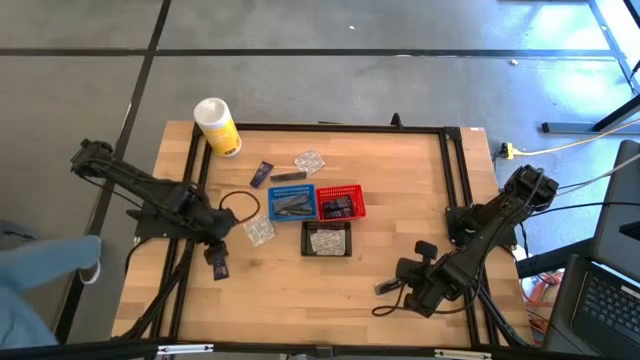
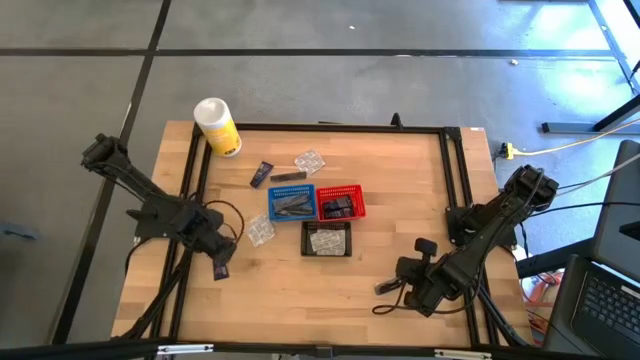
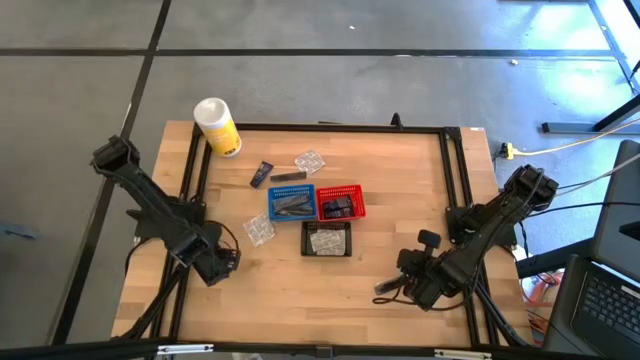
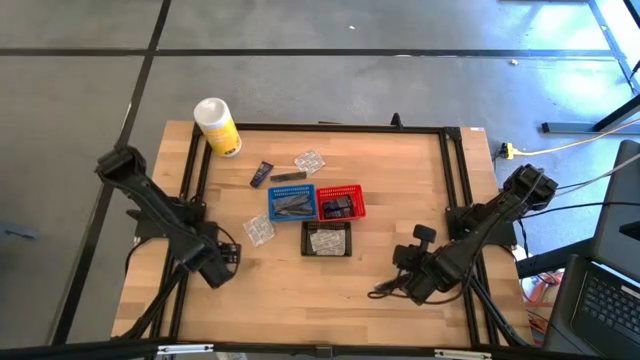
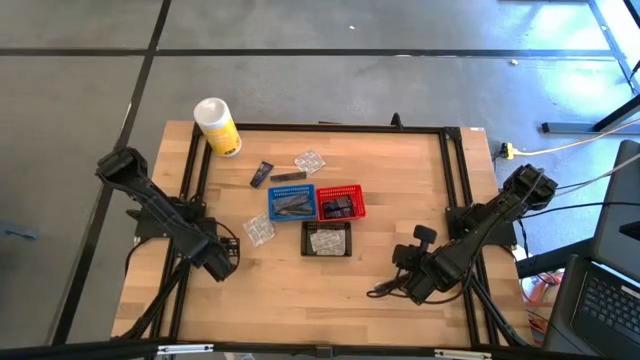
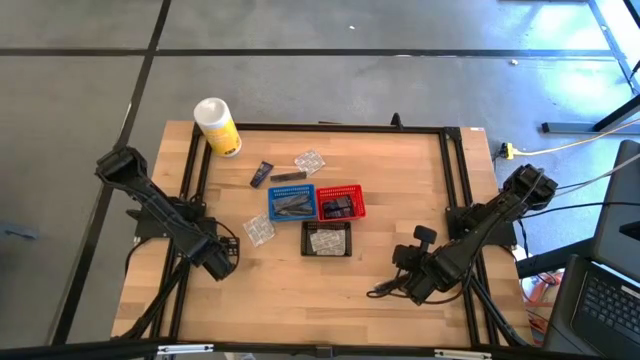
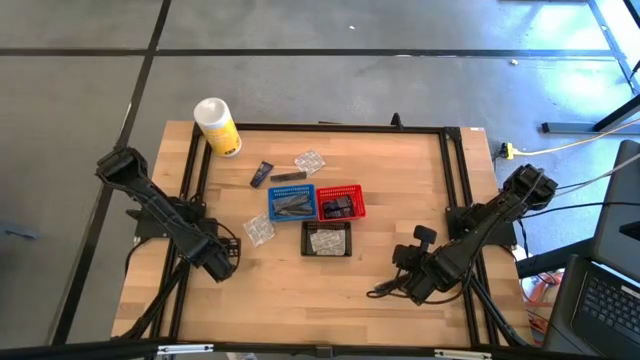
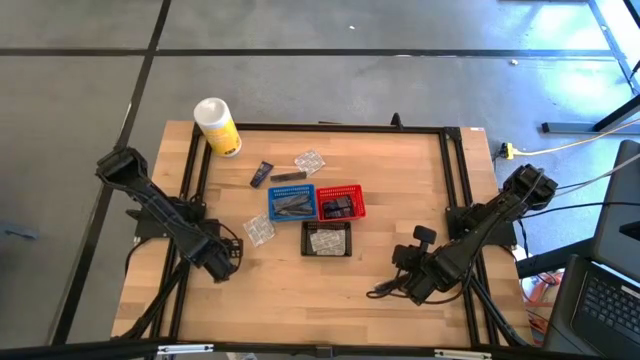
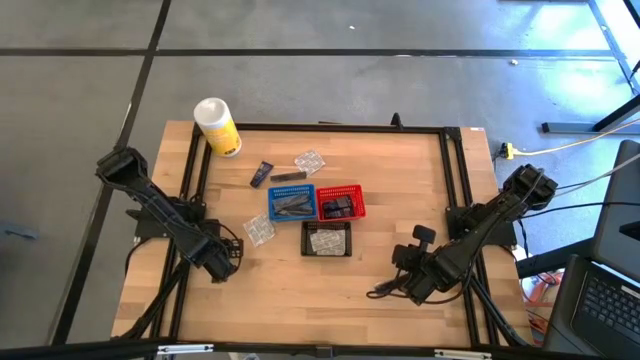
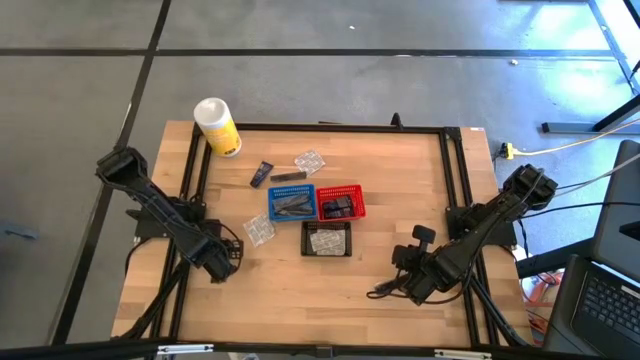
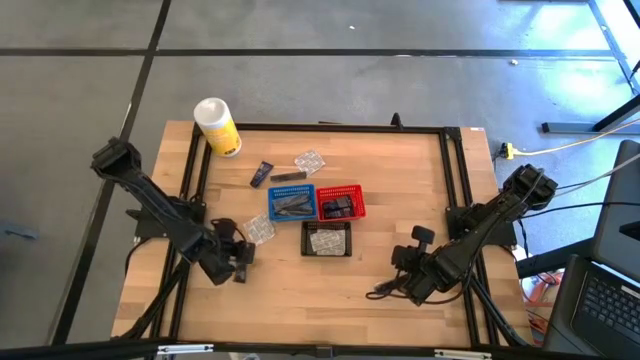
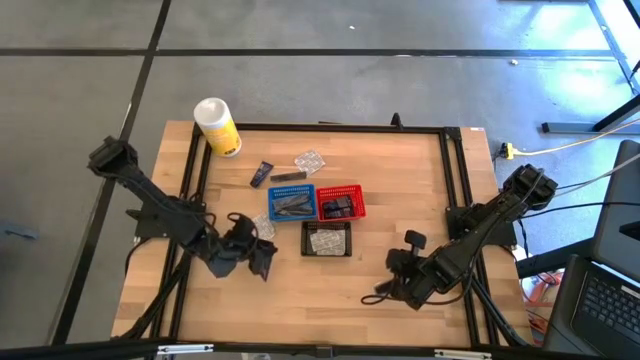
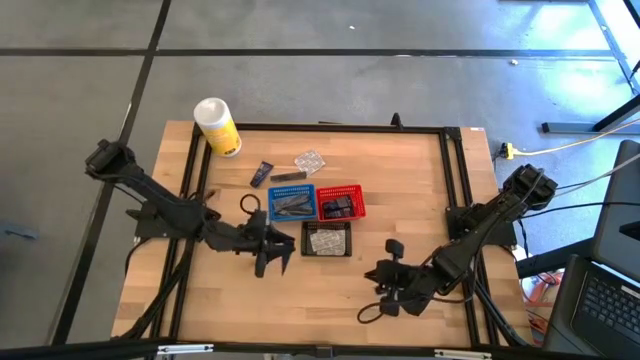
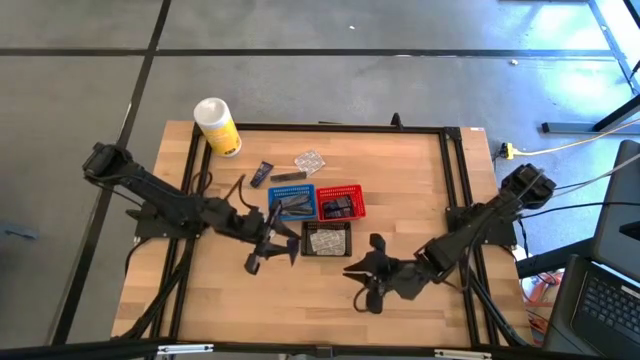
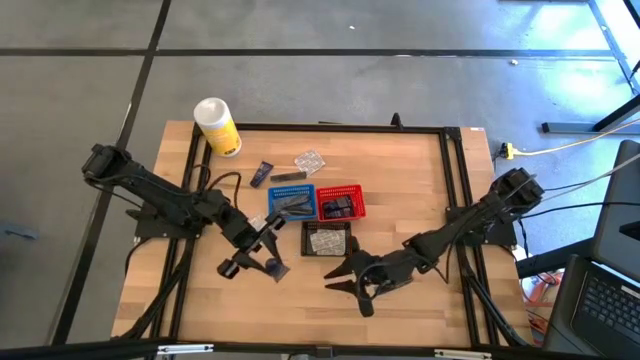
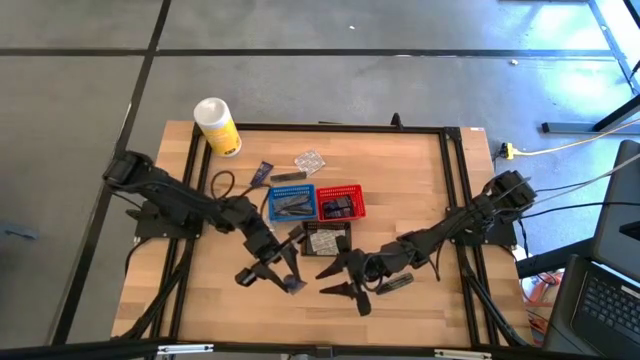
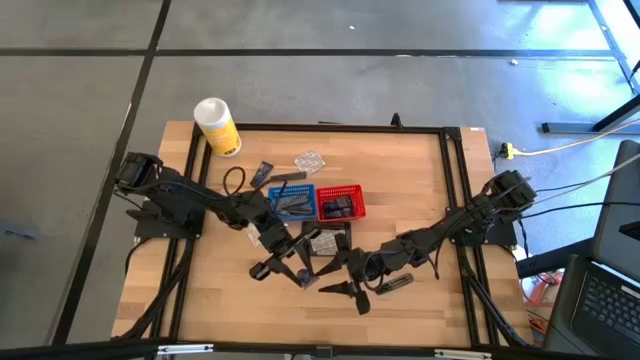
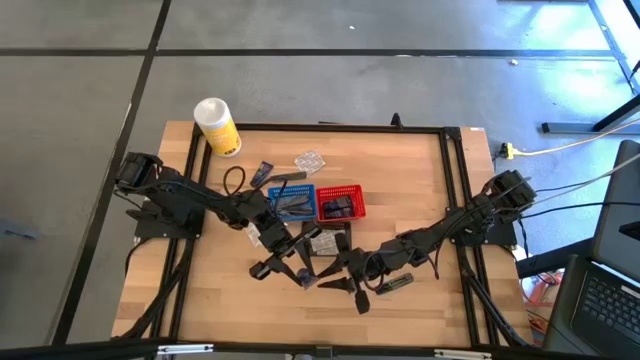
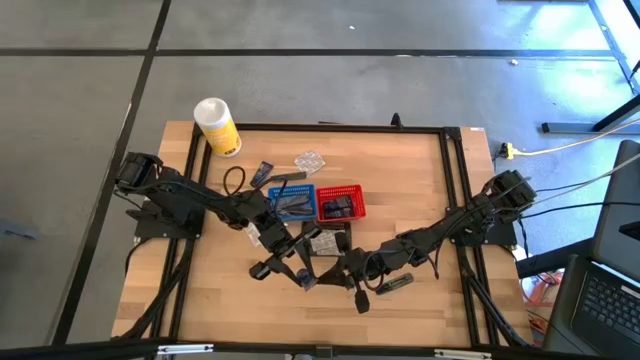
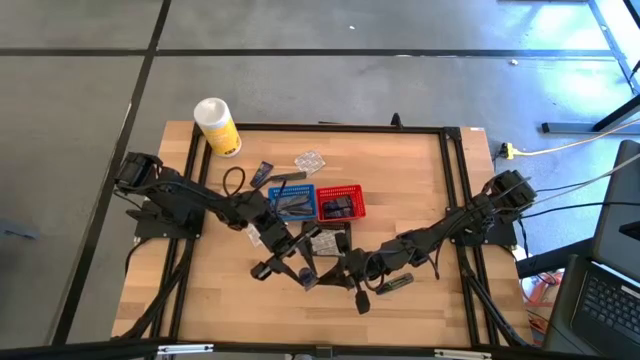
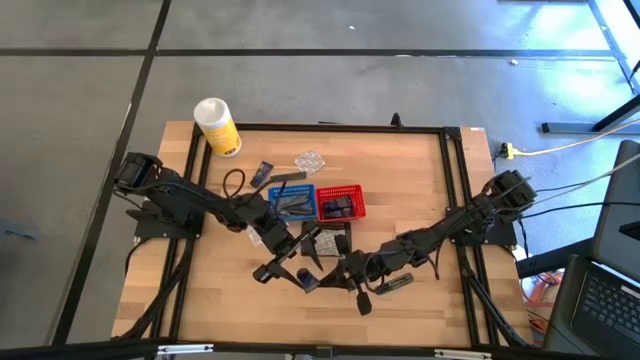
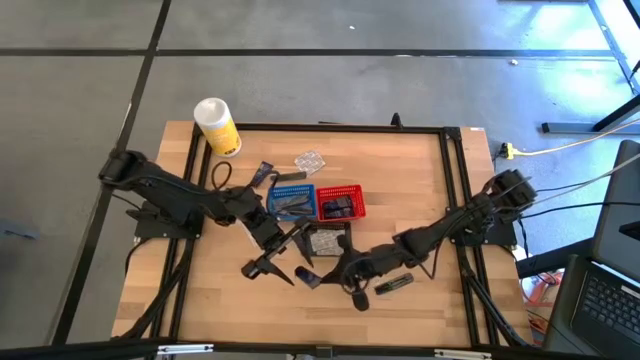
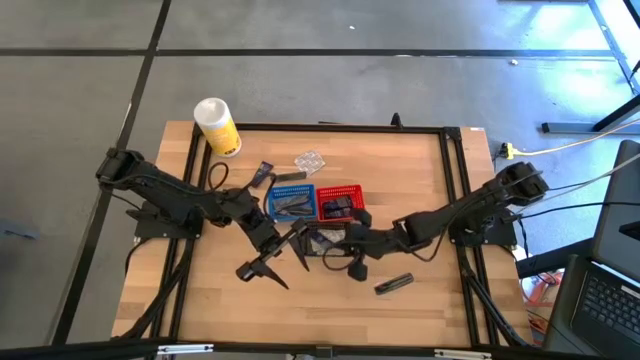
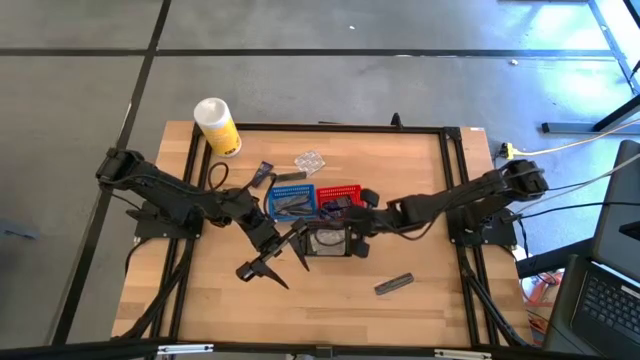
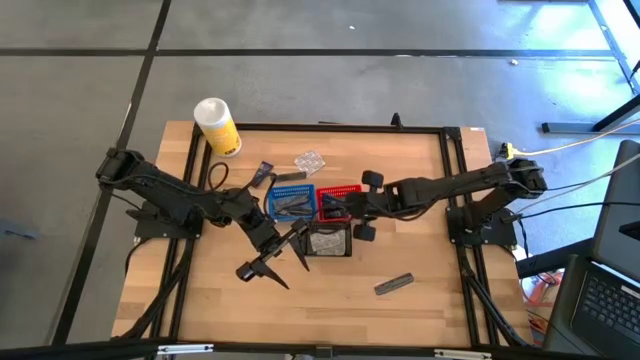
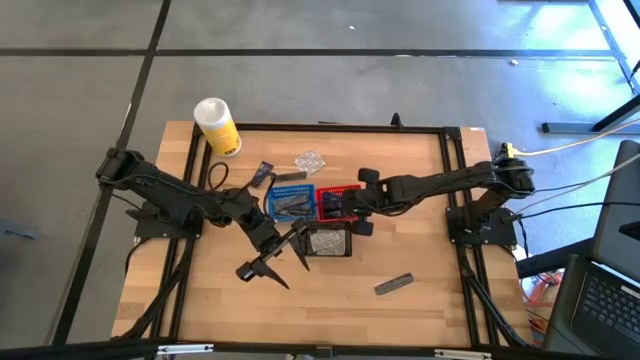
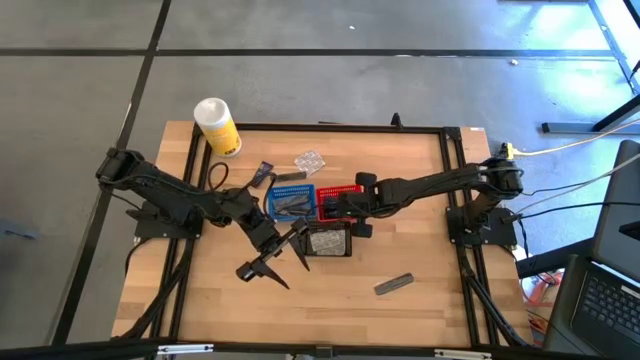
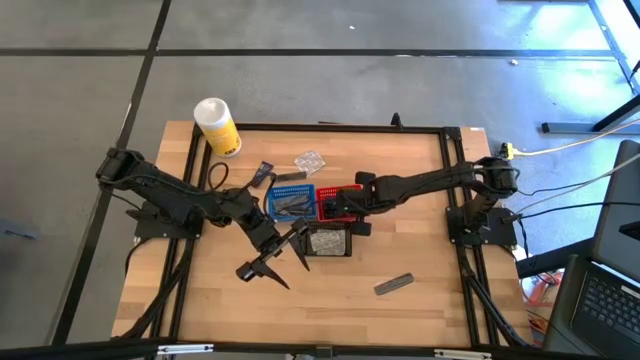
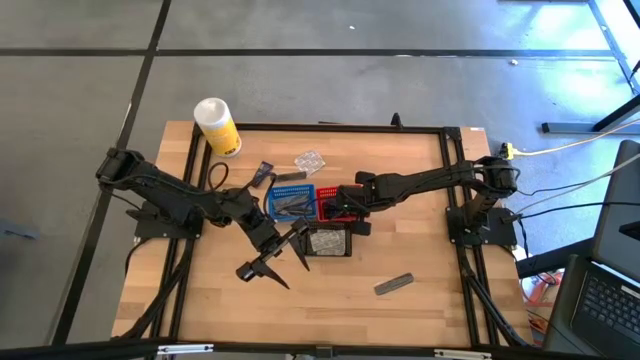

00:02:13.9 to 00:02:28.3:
Task: Pick & Place Travel size toiletries
Put the blue shaver cream into the red bin

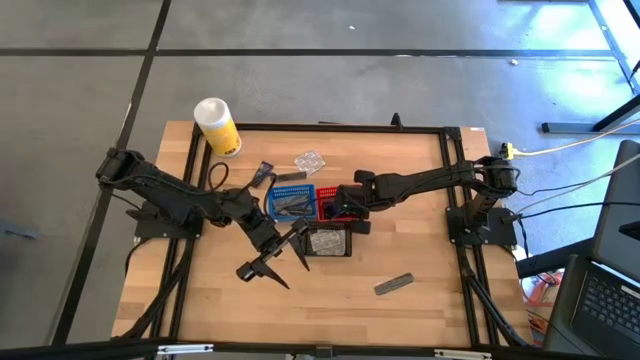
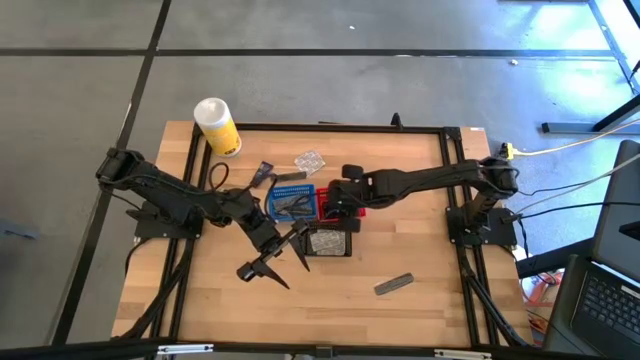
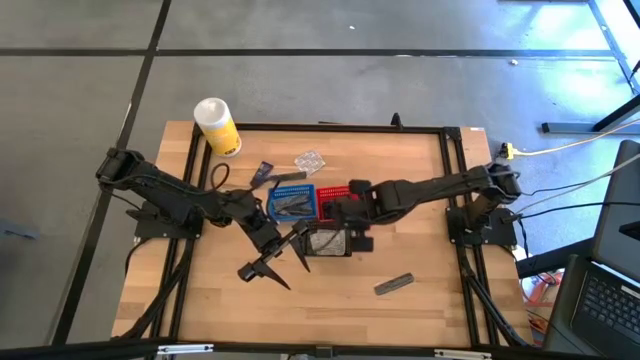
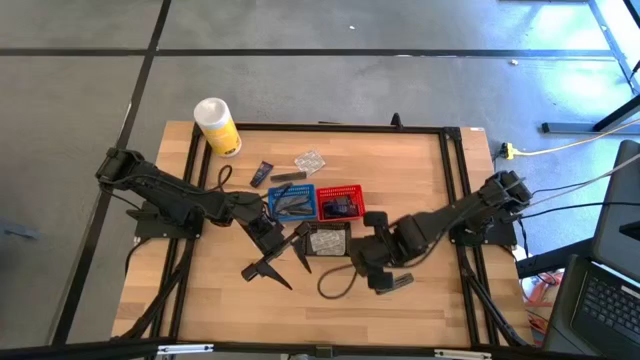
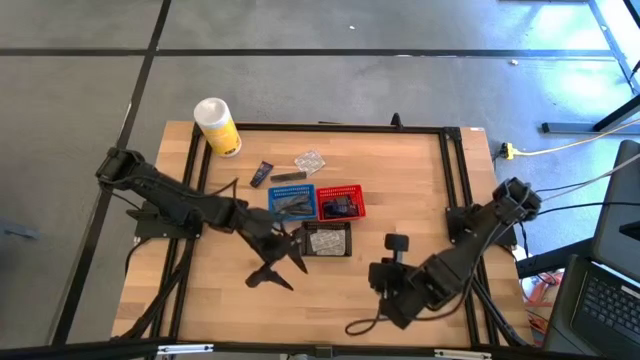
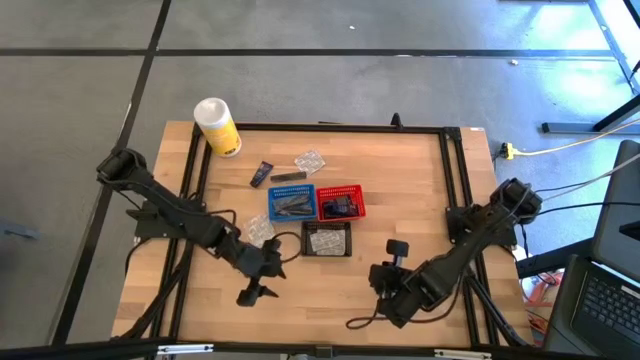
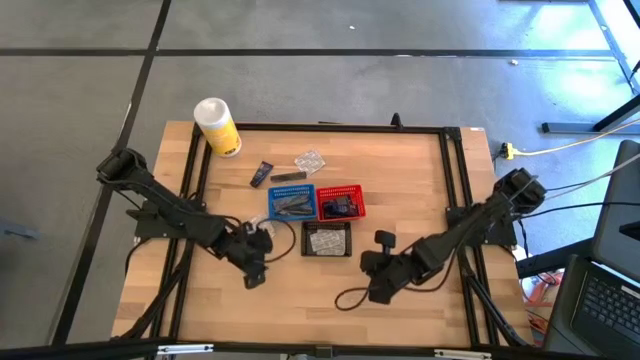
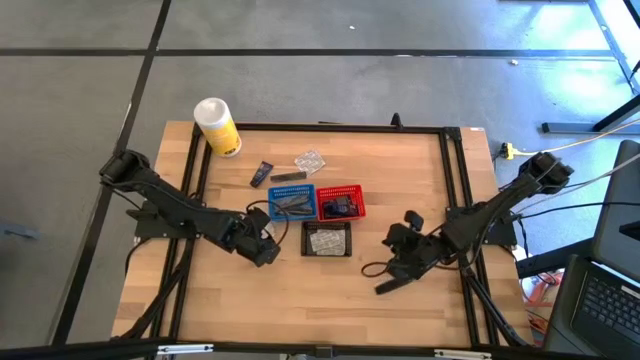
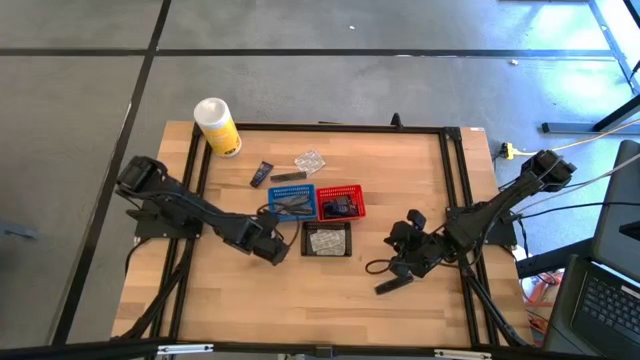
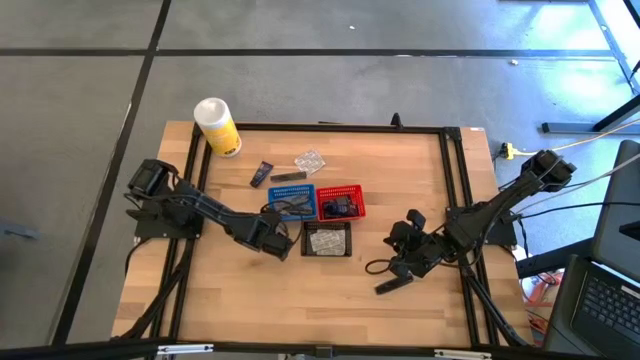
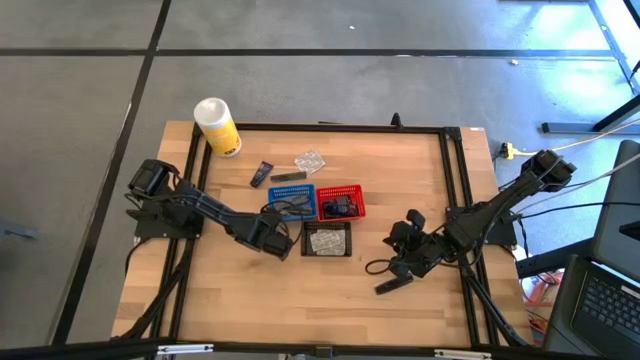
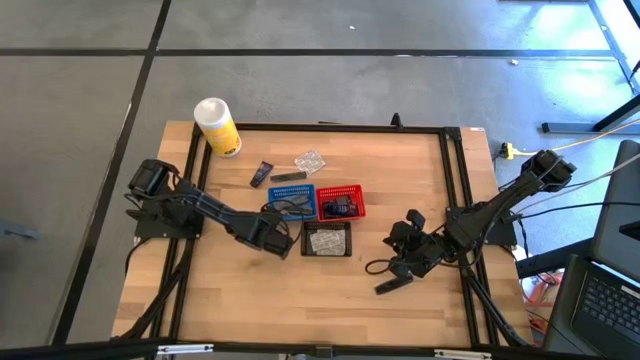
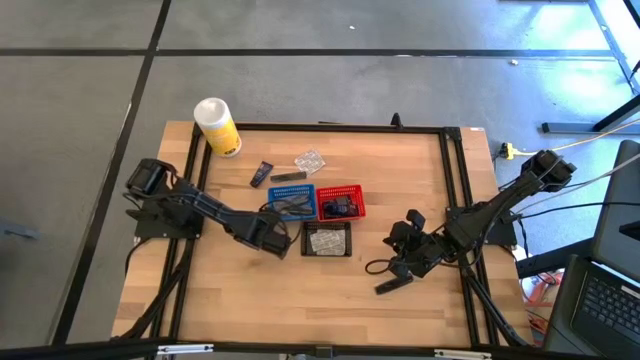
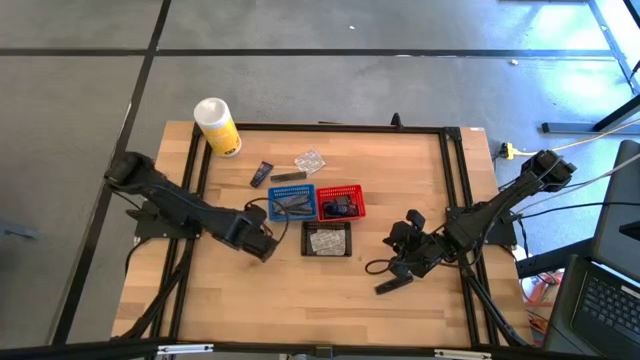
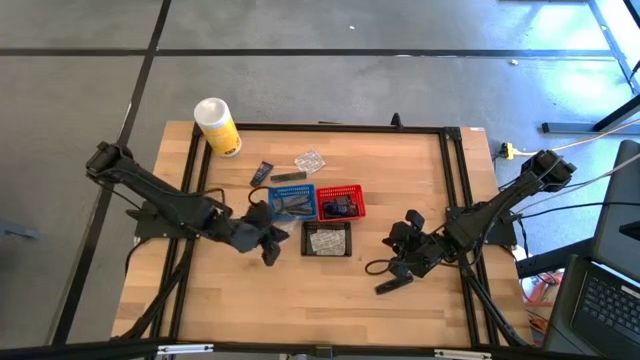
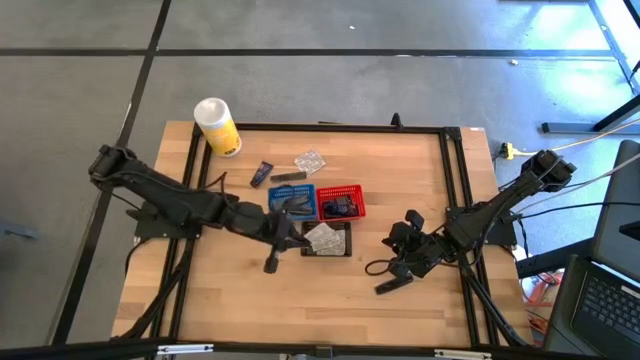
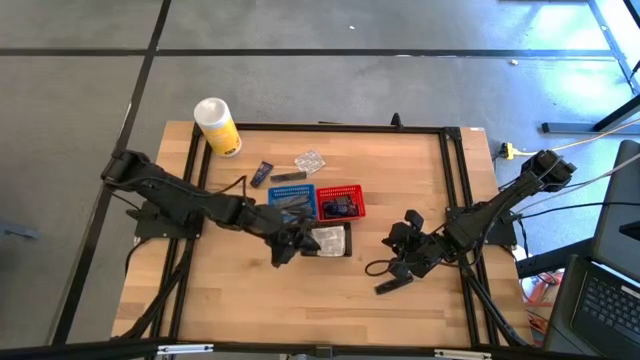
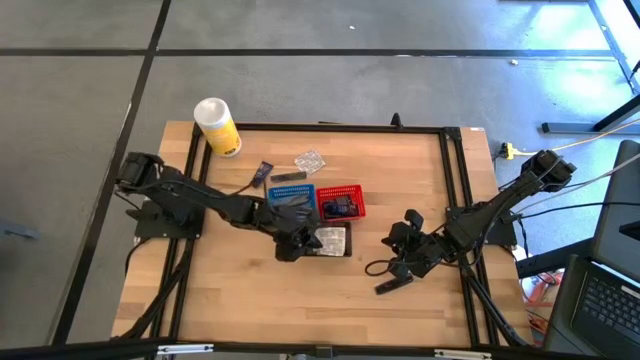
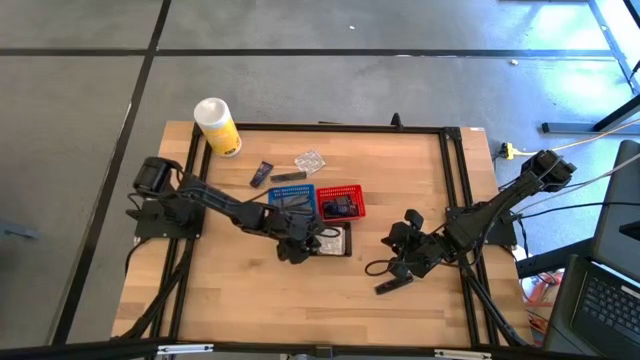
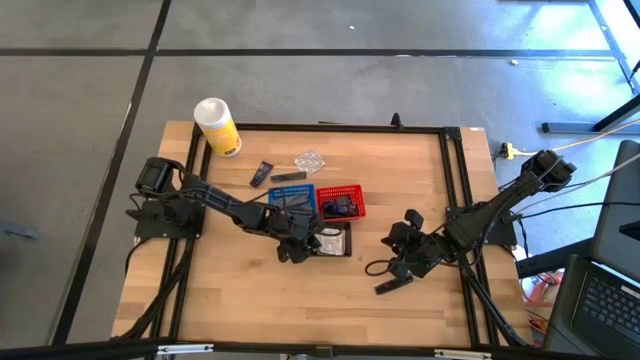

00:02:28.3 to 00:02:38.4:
Put the white bandage into the black bin
